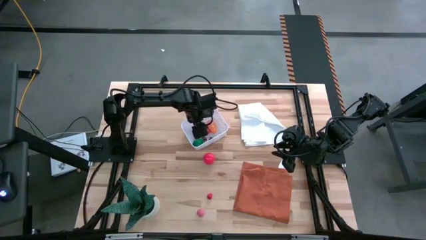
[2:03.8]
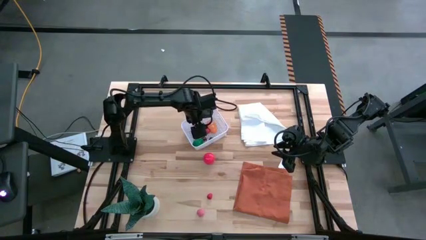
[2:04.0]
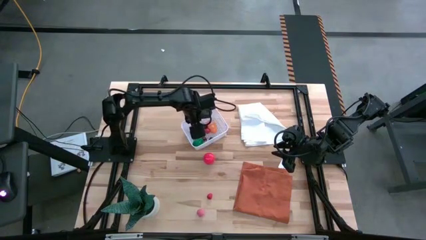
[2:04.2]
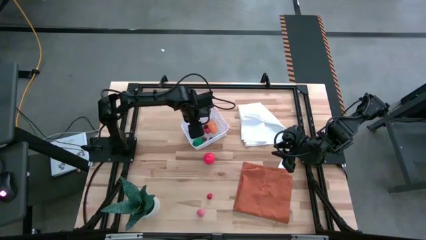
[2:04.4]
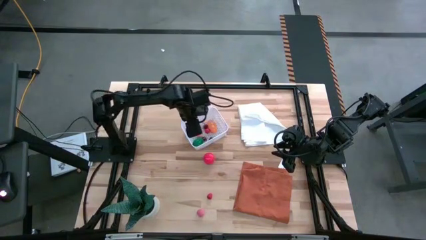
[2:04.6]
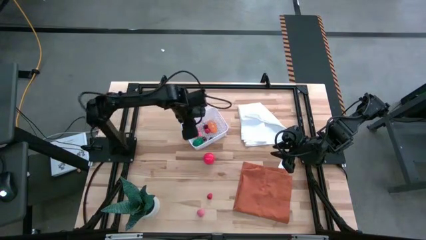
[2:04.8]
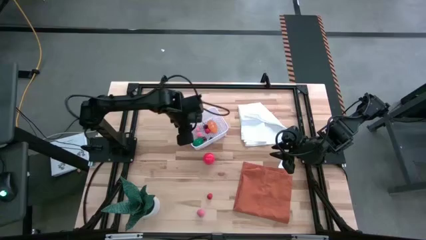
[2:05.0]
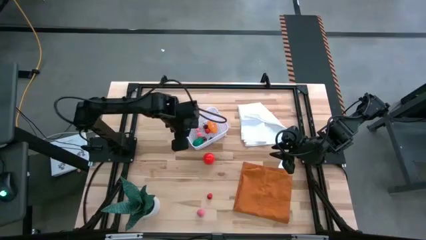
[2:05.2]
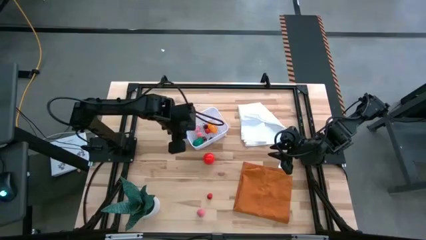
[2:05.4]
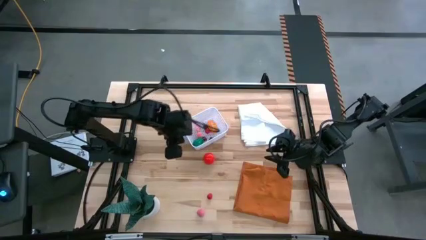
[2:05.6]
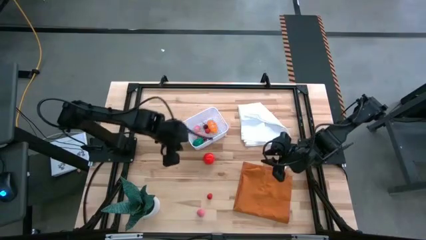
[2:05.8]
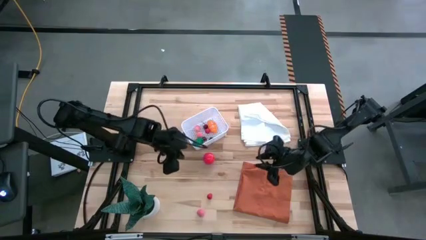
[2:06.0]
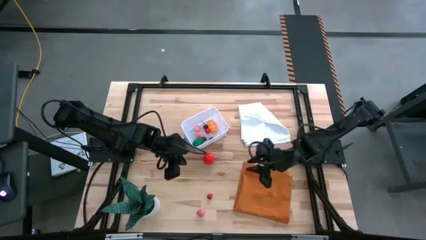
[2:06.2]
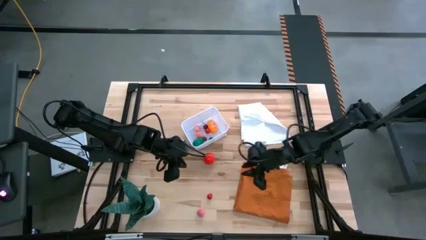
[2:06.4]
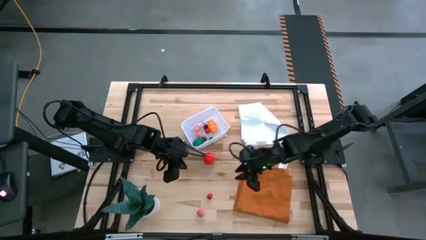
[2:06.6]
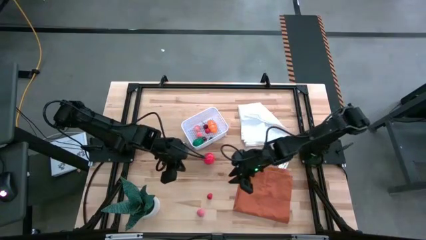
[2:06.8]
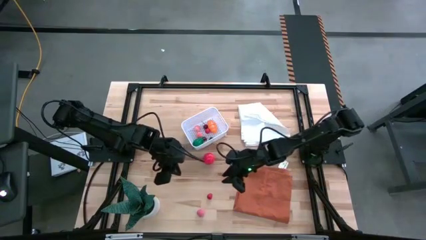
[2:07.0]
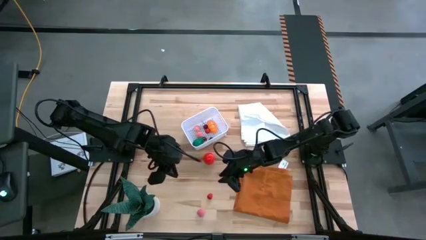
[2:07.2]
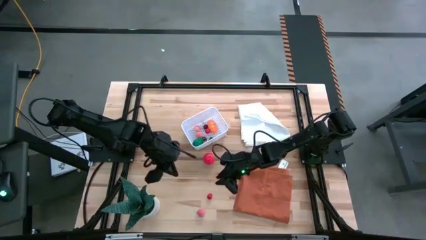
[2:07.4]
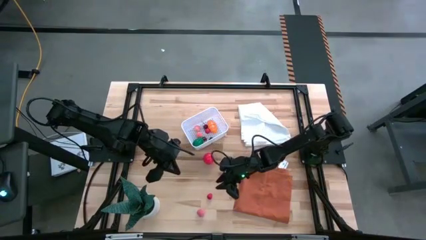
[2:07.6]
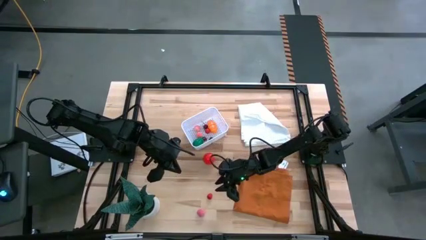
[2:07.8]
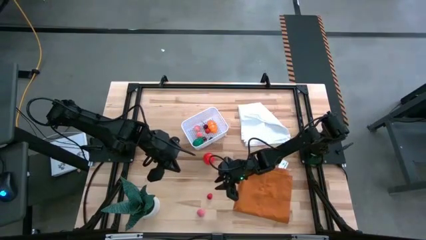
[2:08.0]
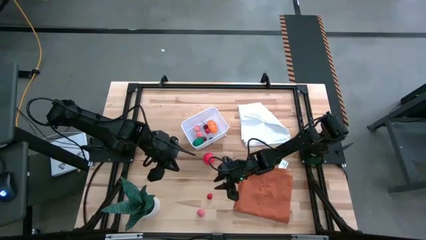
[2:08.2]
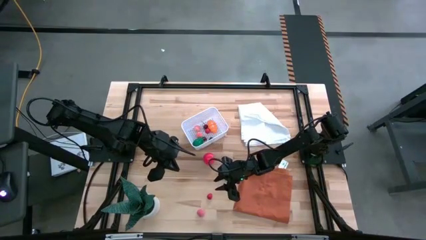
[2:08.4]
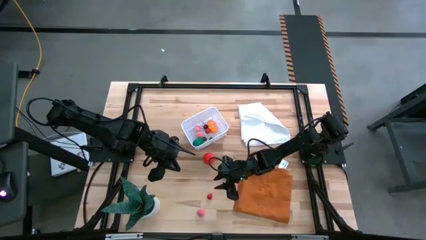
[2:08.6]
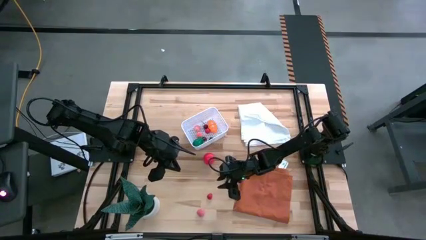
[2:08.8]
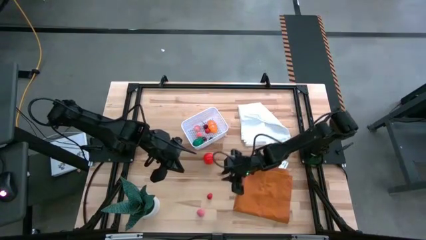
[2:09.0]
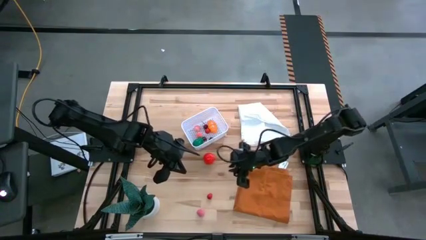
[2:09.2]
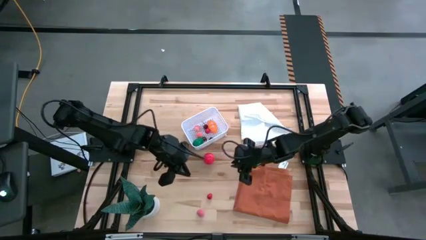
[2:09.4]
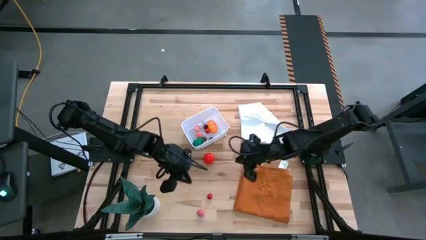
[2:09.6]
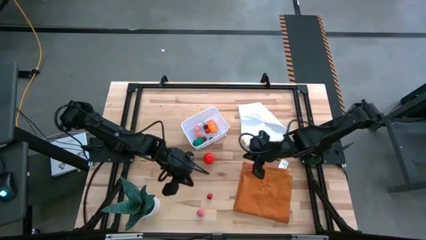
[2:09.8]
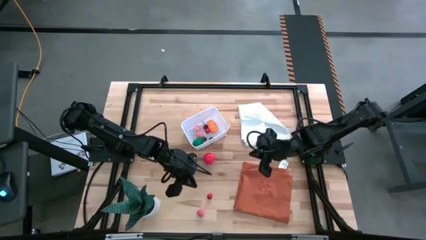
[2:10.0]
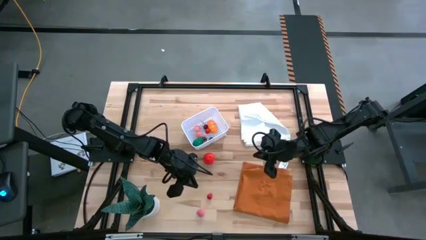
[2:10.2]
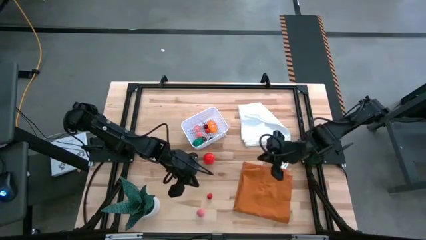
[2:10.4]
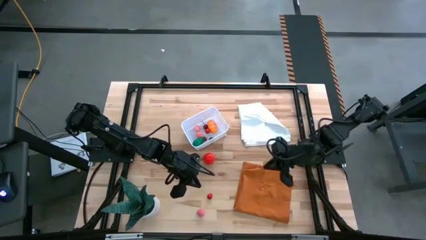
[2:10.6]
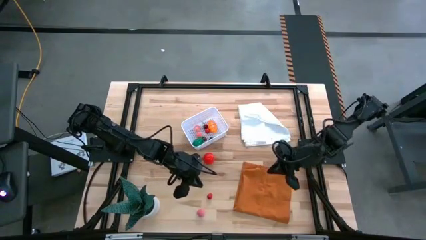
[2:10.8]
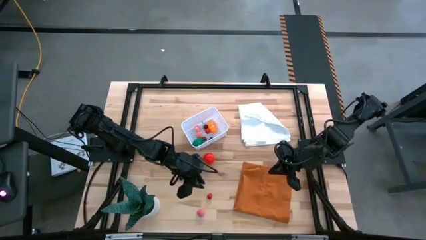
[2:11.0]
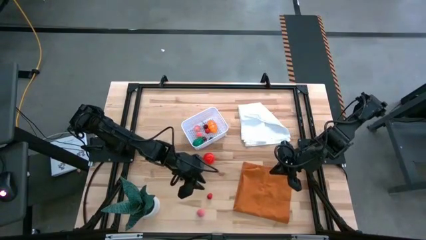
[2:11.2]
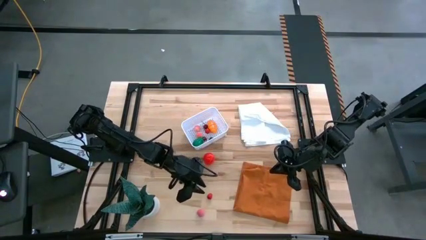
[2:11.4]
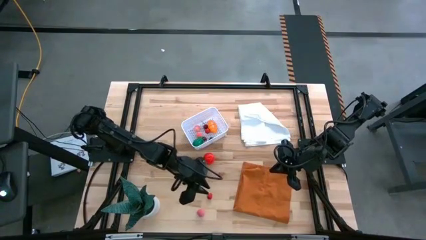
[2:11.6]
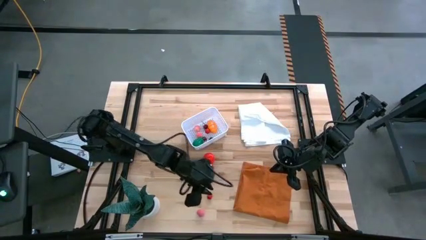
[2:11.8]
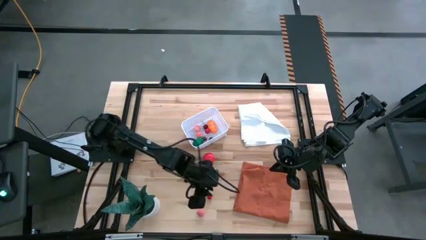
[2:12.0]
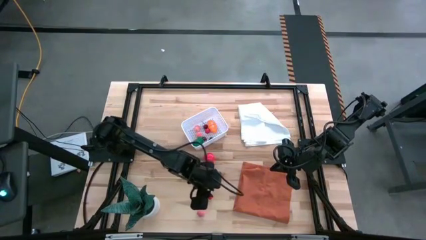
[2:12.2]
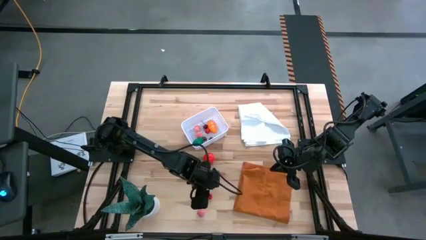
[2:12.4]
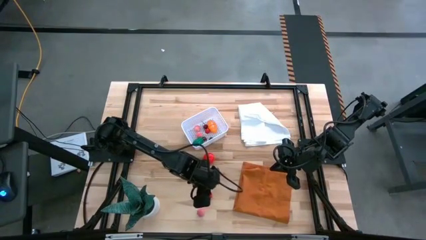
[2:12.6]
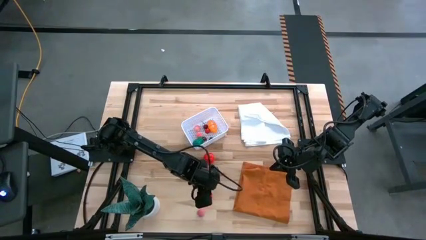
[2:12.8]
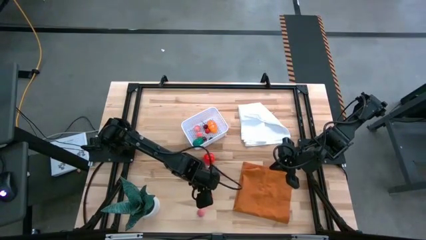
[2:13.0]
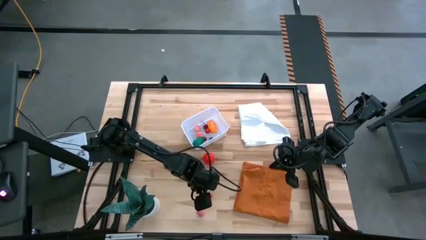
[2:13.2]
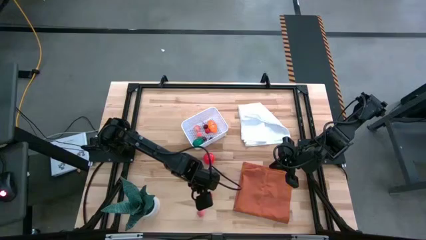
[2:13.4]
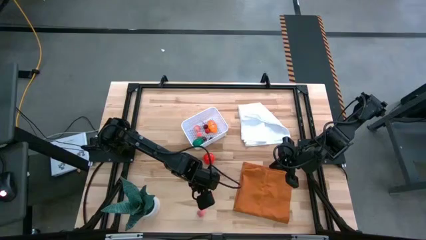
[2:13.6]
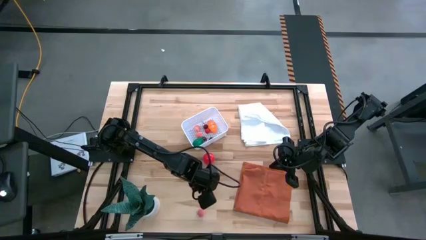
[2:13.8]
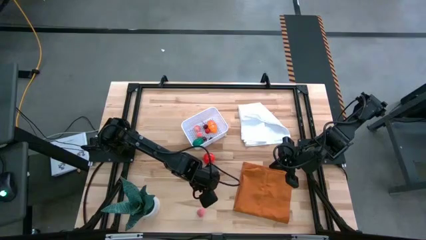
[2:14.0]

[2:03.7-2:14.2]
Task: Pick and placing Produce into tupperware
Put the apricot in the basket

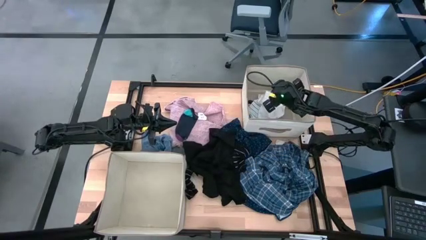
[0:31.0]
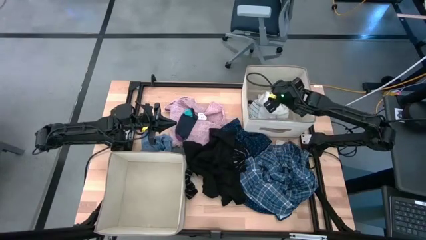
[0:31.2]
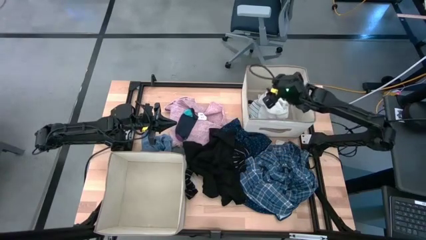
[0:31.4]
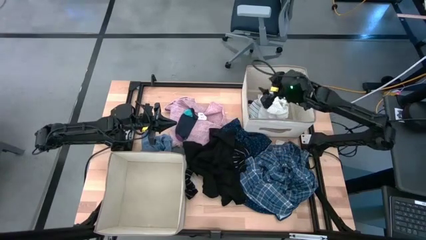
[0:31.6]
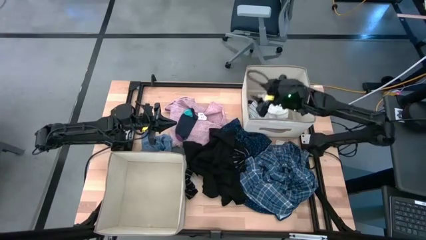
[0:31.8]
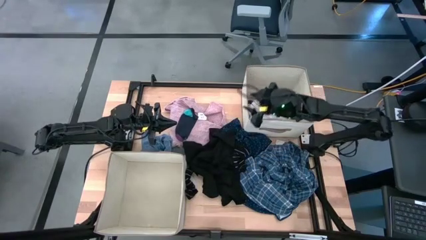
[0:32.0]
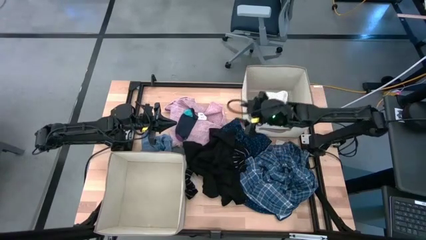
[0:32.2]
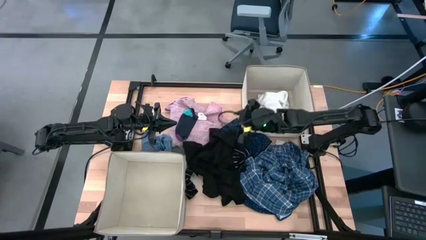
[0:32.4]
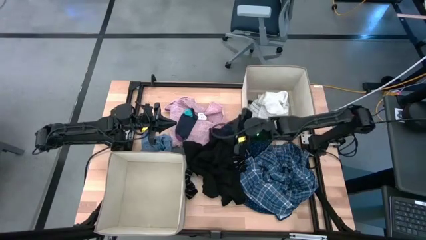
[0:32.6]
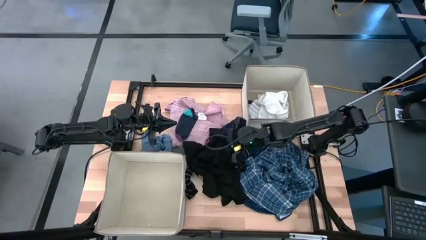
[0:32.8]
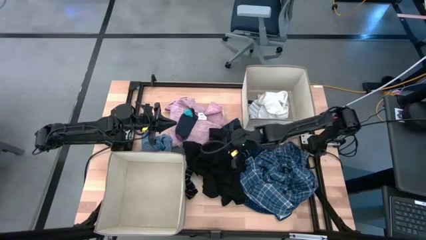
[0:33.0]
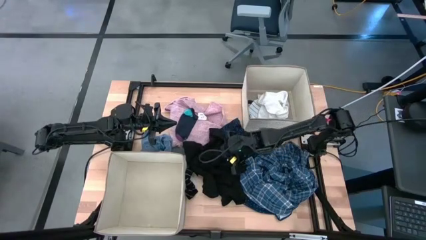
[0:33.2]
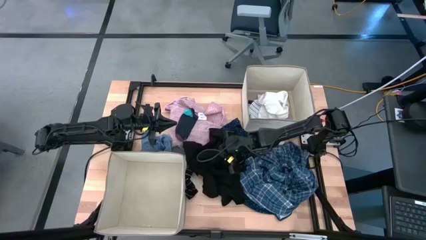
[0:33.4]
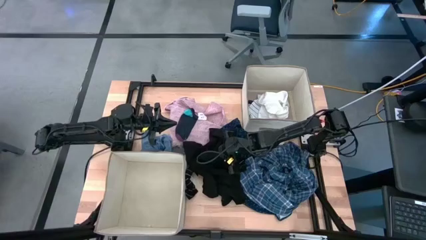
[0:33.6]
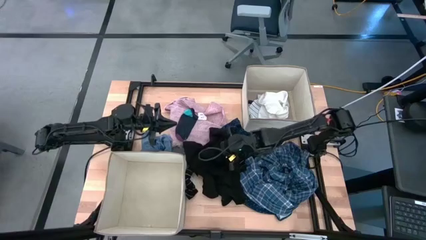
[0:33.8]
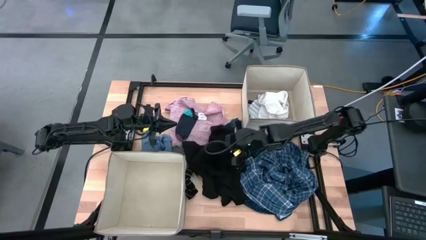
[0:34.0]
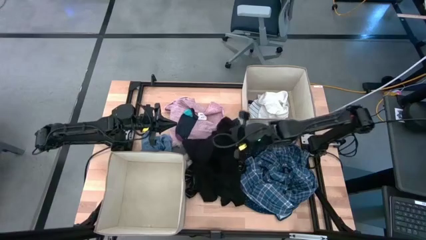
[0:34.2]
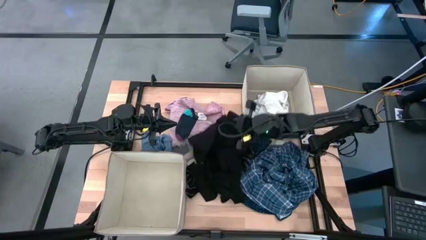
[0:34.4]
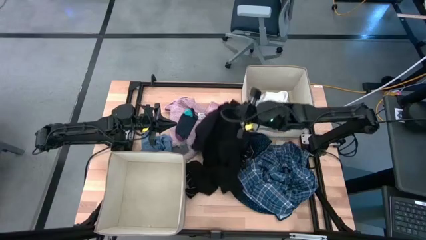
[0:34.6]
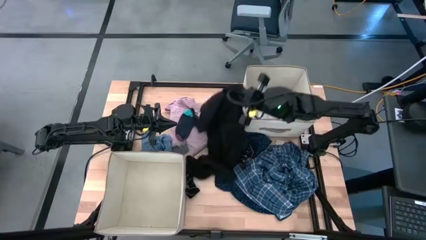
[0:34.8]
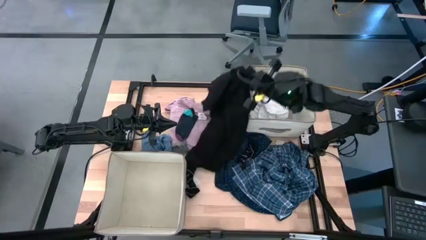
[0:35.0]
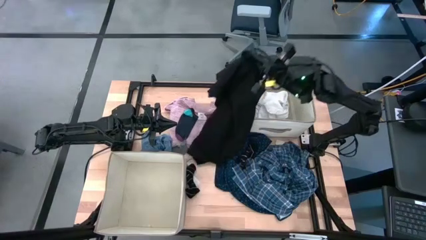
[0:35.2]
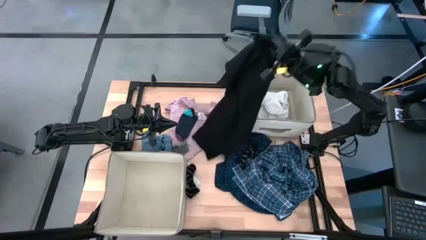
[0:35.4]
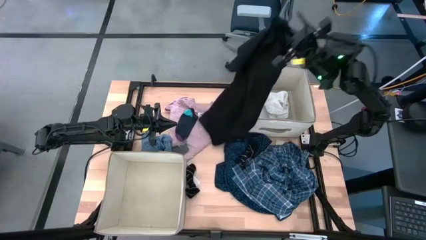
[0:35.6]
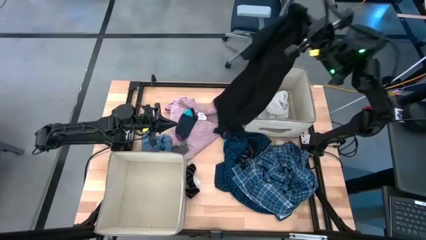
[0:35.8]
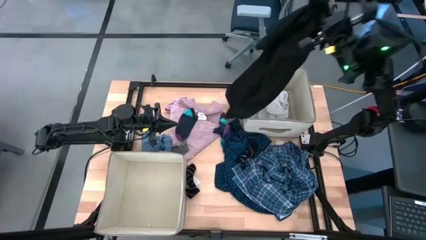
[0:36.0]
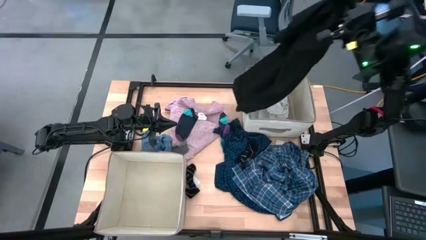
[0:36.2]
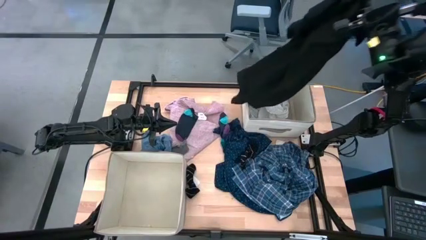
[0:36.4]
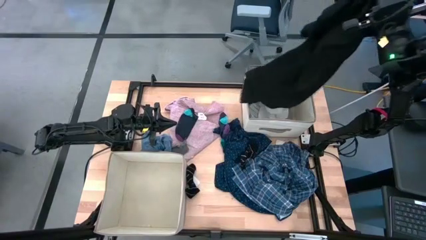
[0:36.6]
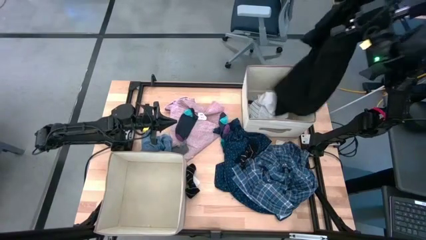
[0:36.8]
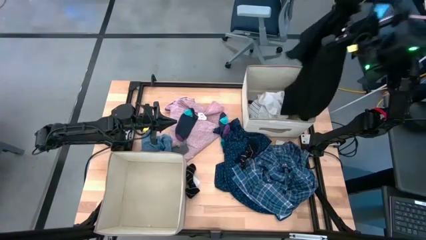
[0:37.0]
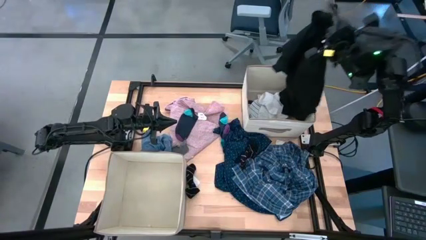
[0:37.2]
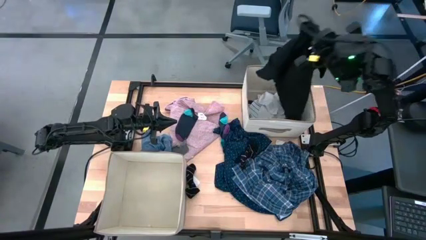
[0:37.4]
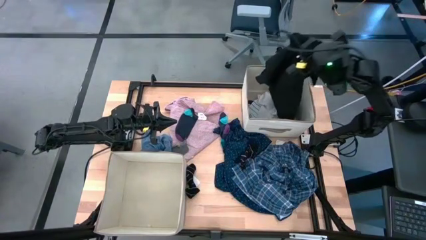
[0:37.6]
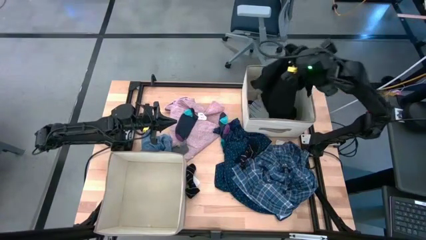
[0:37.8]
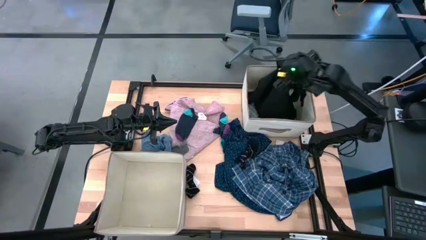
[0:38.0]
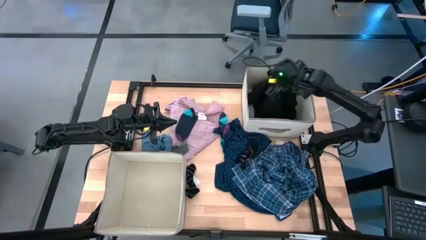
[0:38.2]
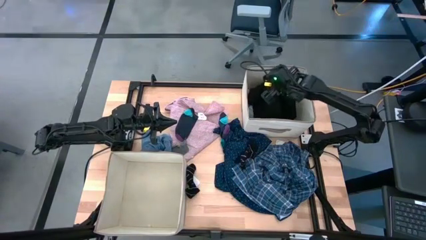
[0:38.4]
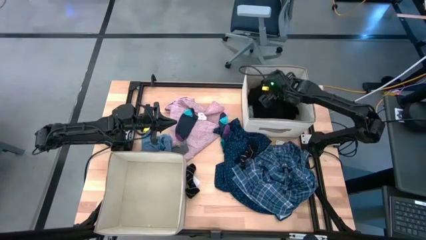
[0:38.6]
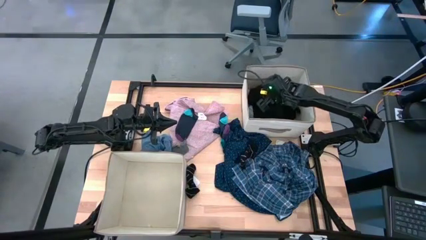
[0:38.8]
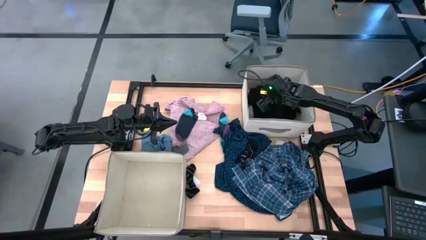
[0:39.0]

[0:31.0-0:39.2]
Task: Sort clothes
Put the black shirt into the top white laundry organizer
